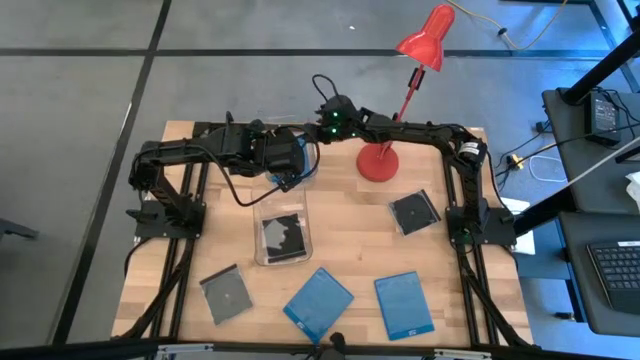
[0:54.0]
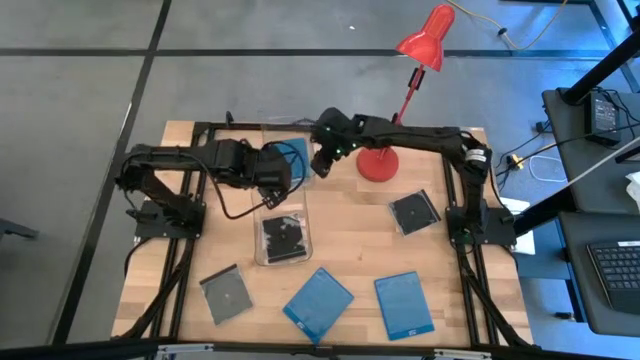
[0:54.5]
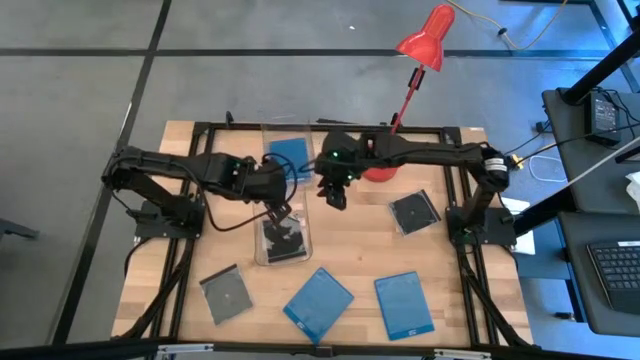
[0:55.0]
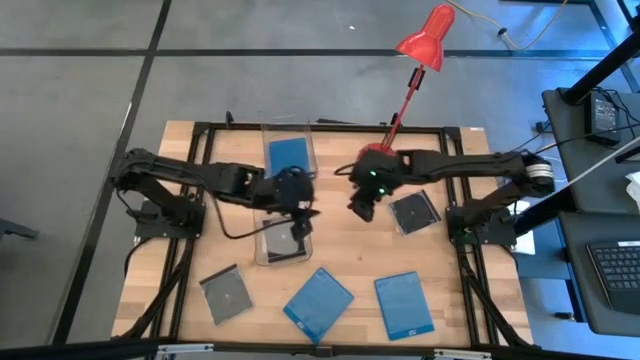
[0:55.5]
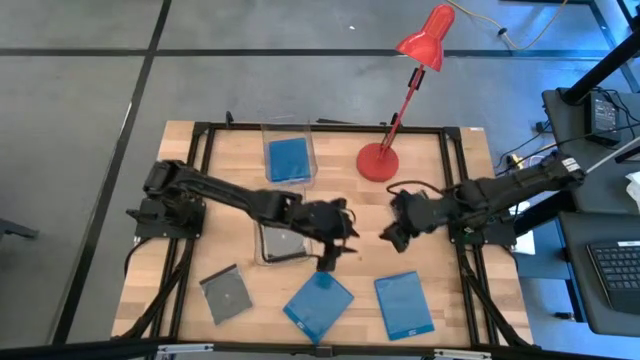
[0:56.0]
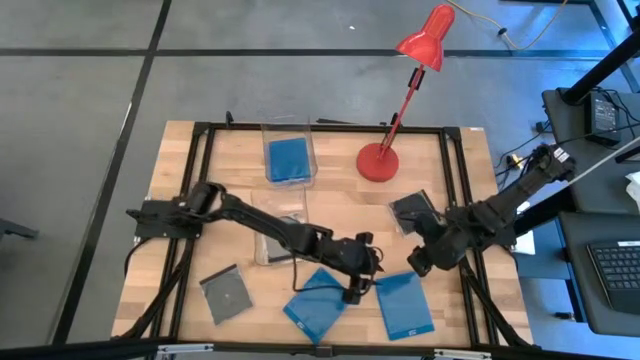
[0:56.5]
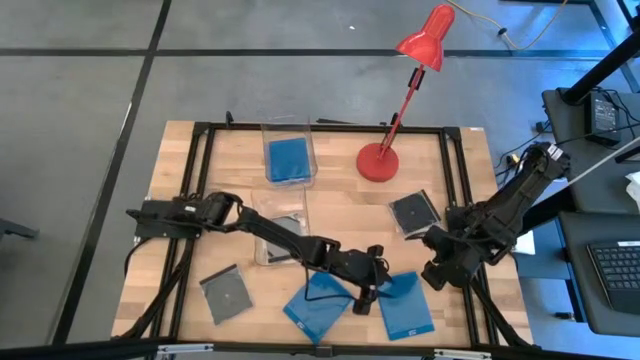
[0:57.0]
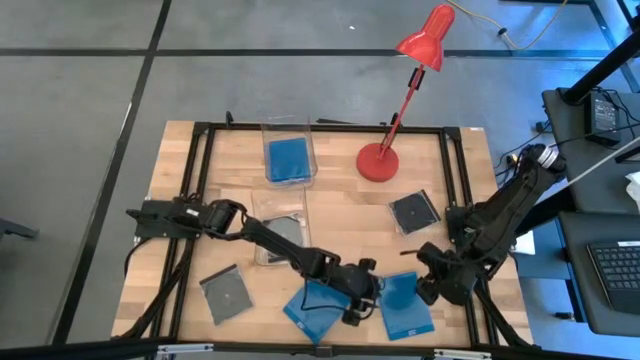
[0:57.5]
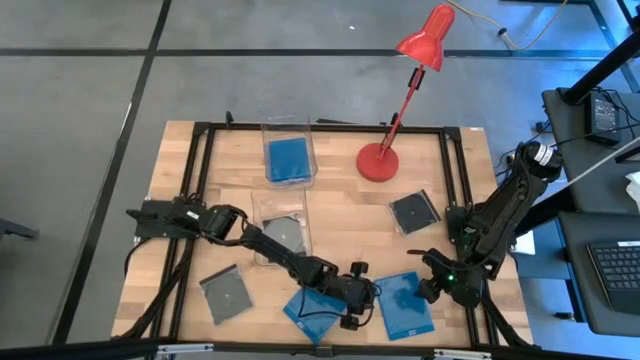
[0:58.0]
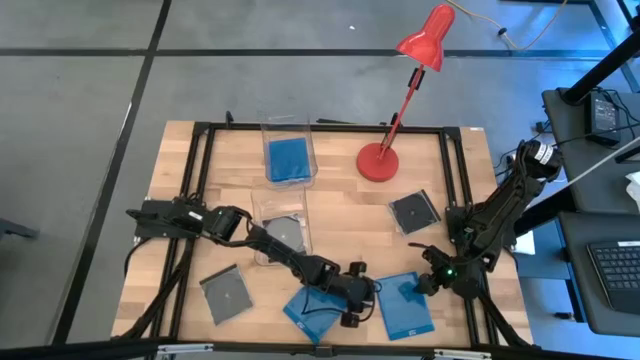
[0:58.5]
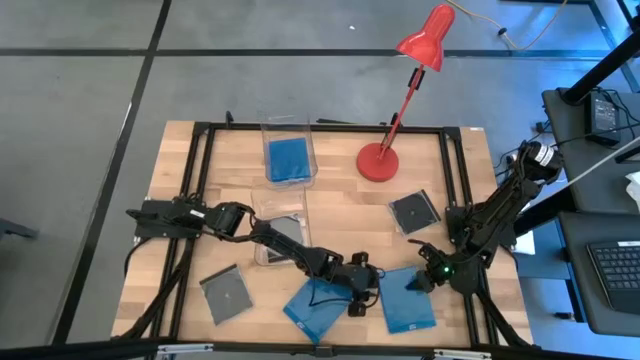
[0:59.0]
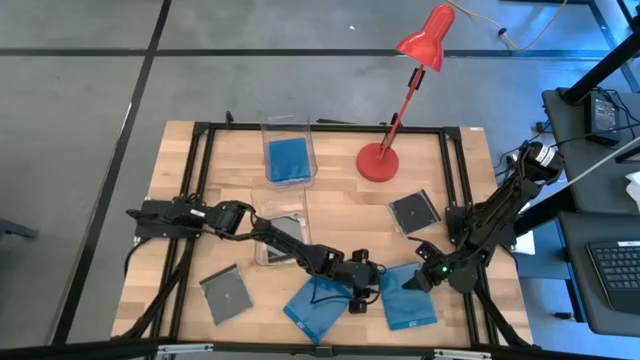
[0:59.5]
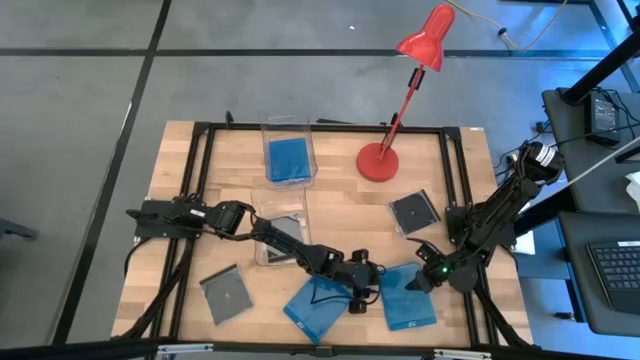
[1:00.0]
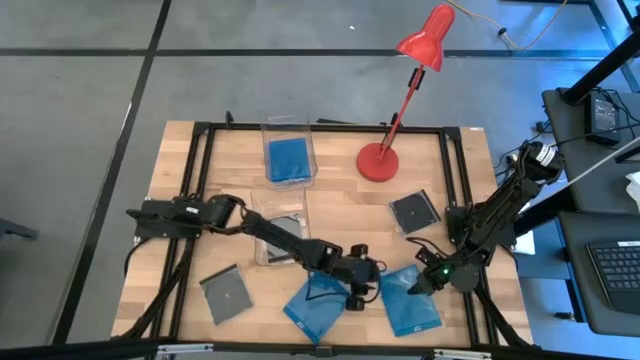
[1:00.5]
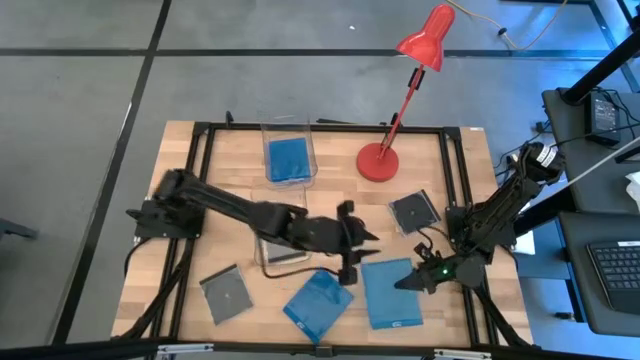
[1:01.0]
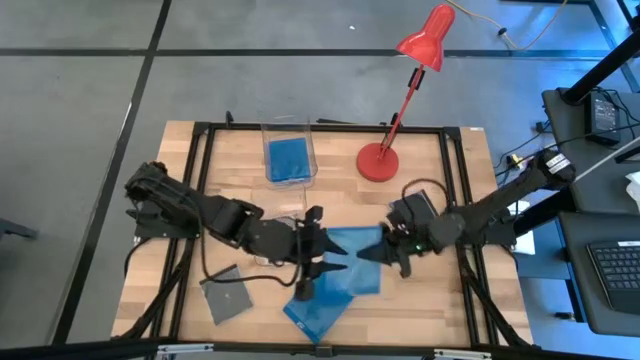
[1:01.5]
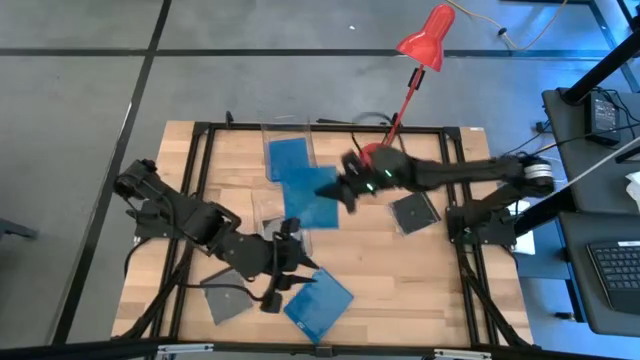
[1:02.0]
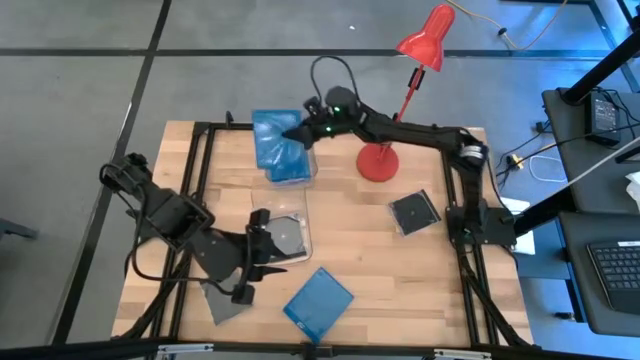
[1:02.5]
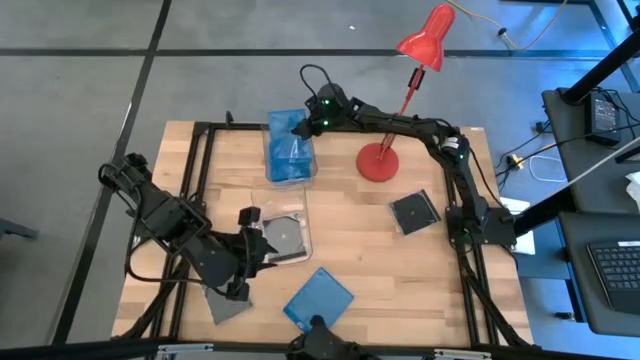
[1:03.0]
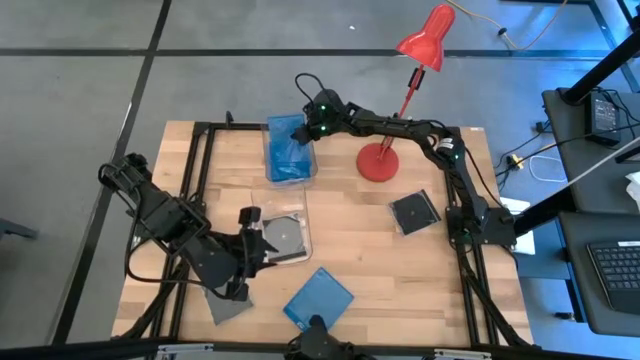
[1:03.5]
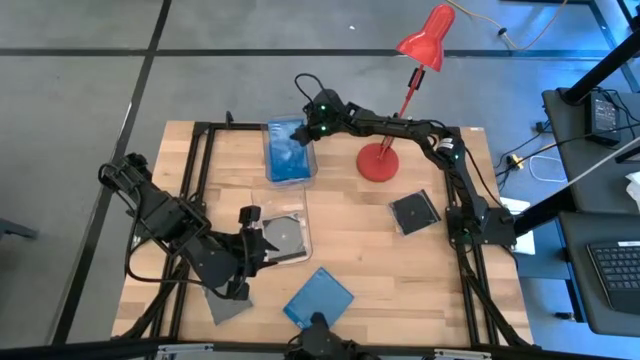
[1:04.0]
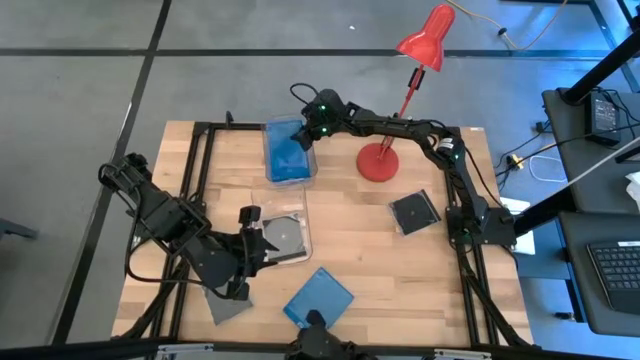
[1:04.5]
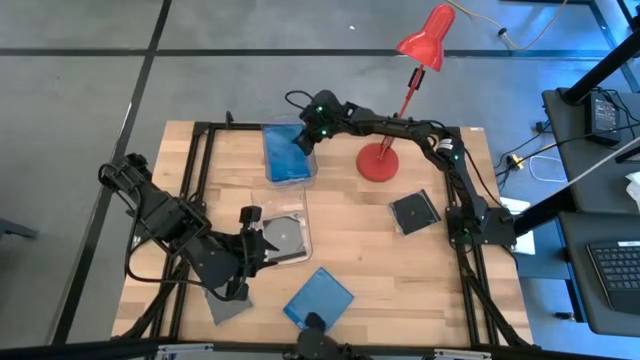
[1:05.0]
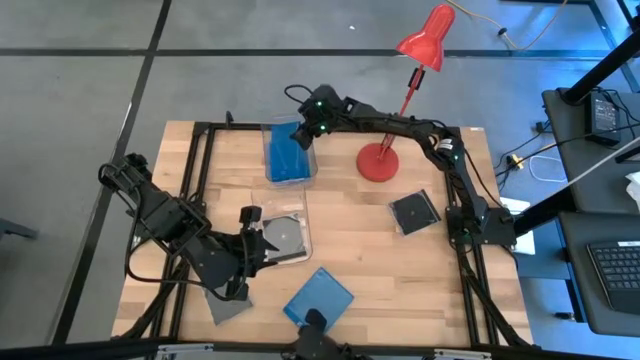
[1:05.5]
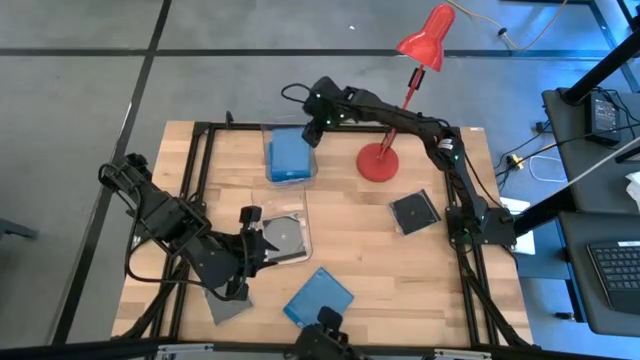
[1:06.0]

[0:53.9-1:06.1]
Task: Pick & place jewel cases by type
Put the right blue cd case into the top transparent bin

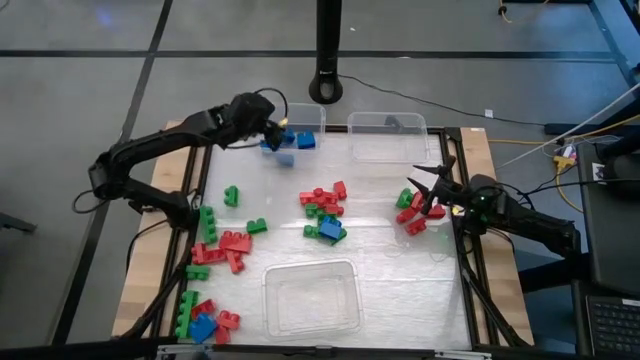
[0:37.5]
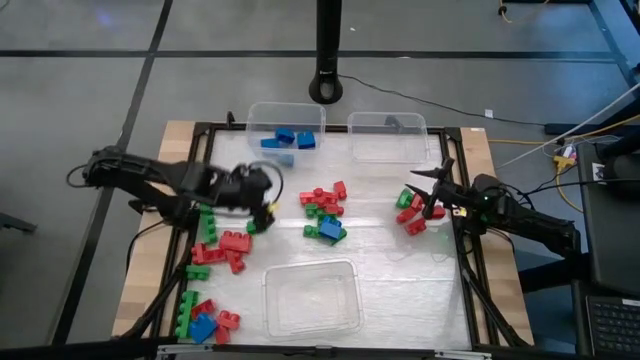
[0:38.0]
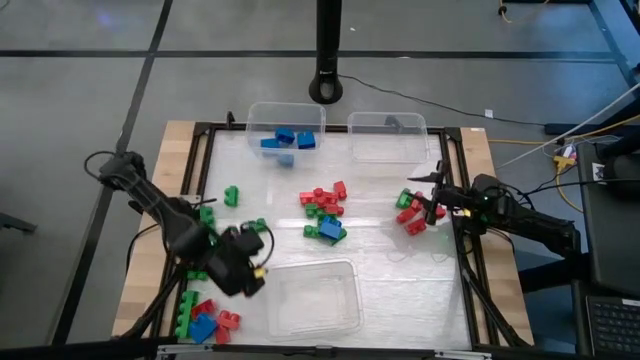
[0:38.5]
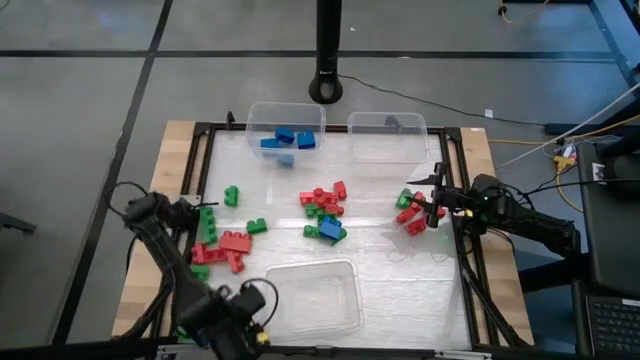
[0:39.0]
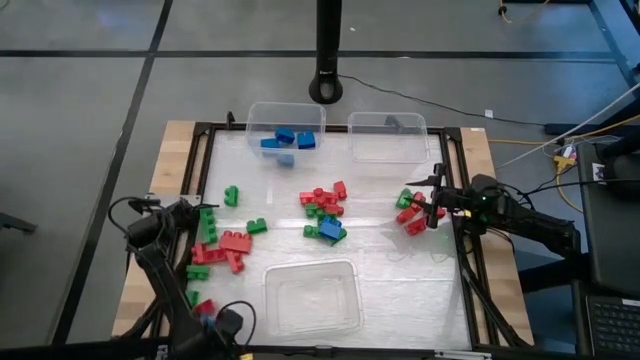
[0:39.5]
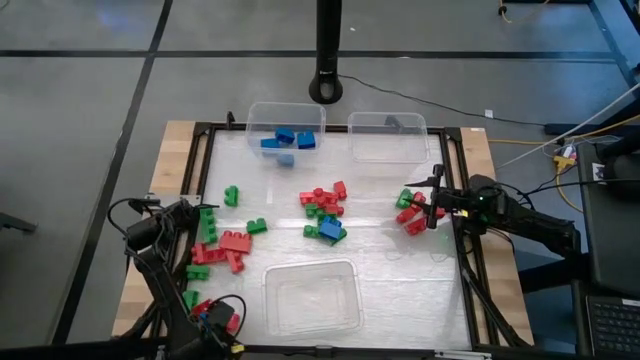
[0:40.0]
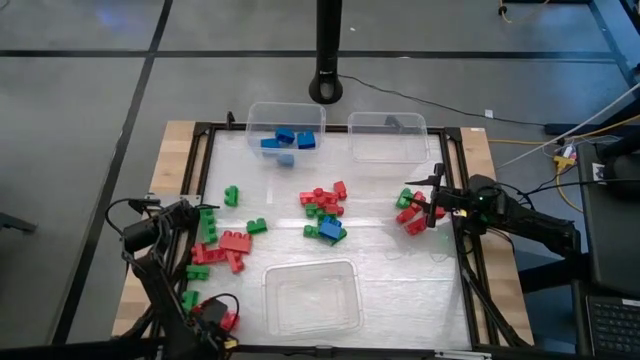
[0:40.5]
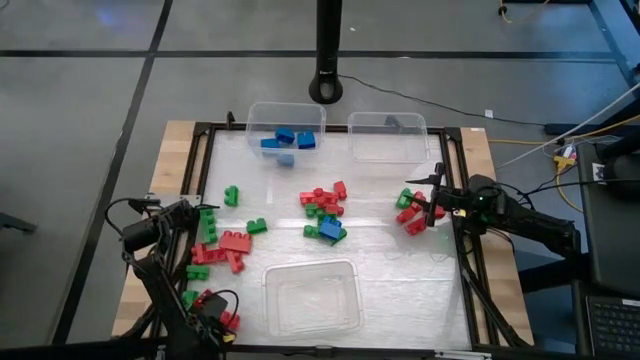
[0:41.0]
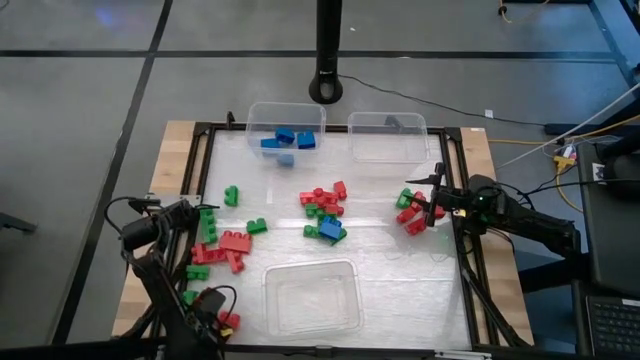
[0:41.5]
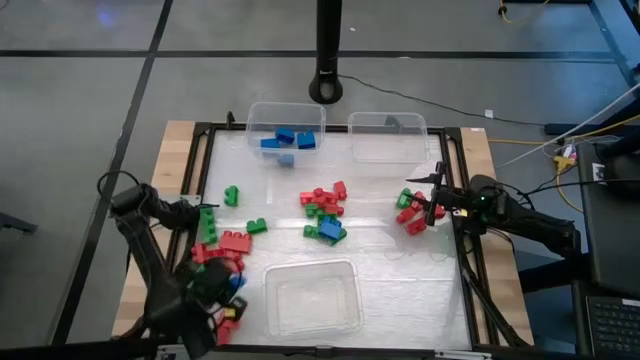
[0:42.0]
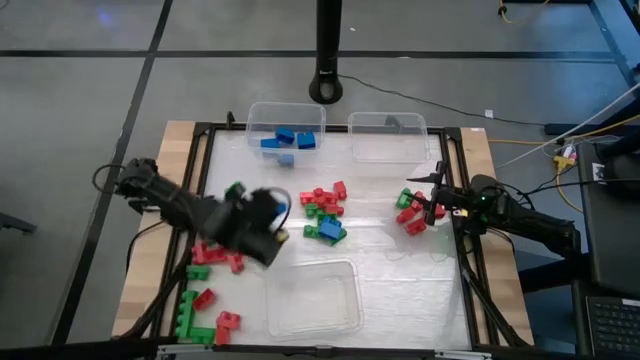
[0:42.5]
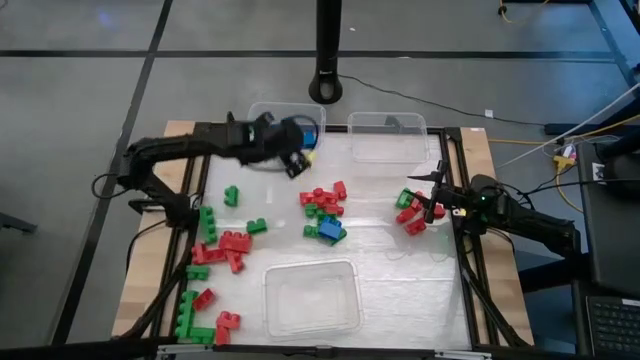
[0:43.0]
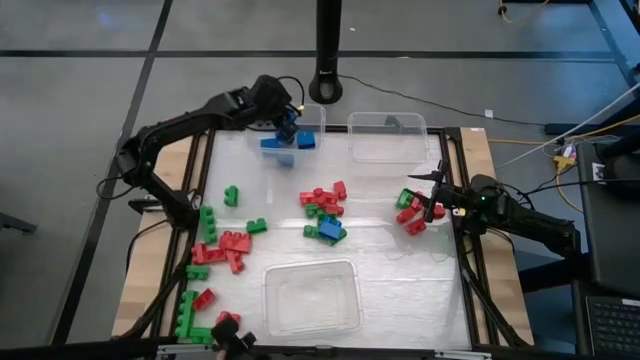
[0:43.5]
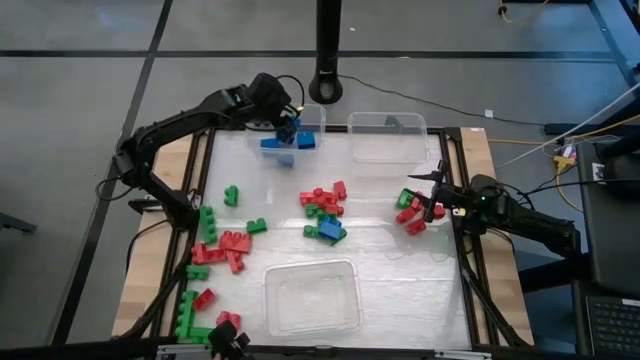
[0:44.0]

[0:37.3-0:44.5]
Task: Sort blocks
Put the blue game piece into the top left transparent bin

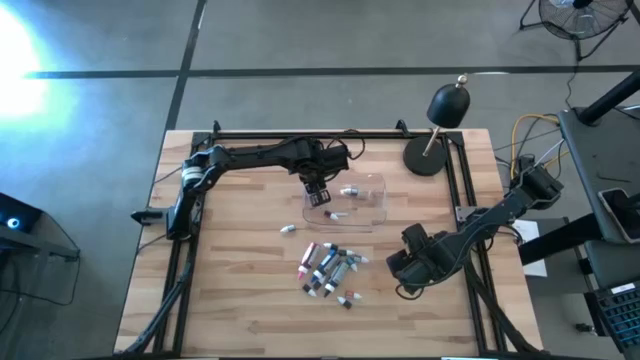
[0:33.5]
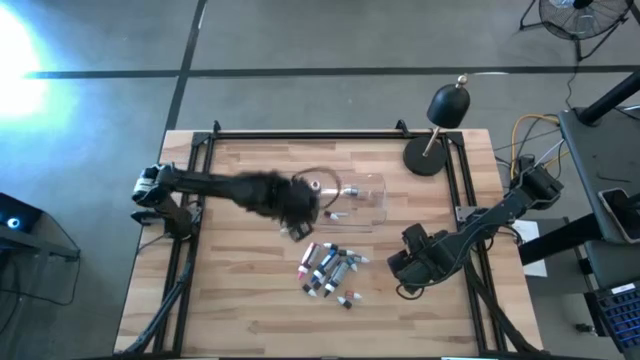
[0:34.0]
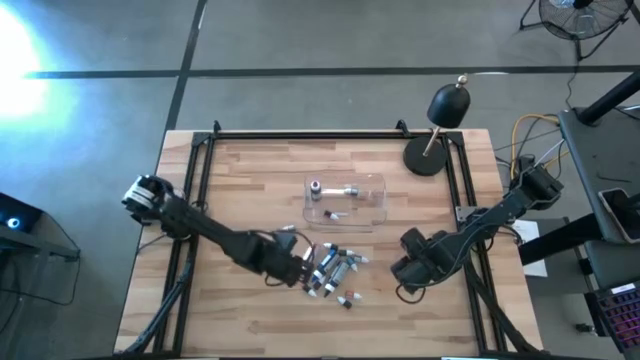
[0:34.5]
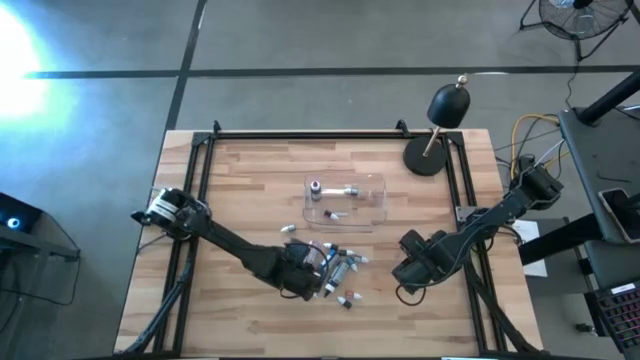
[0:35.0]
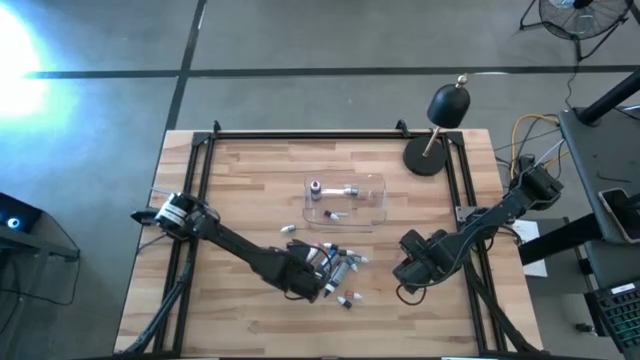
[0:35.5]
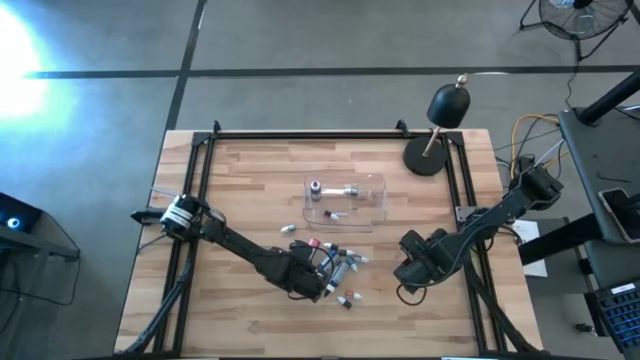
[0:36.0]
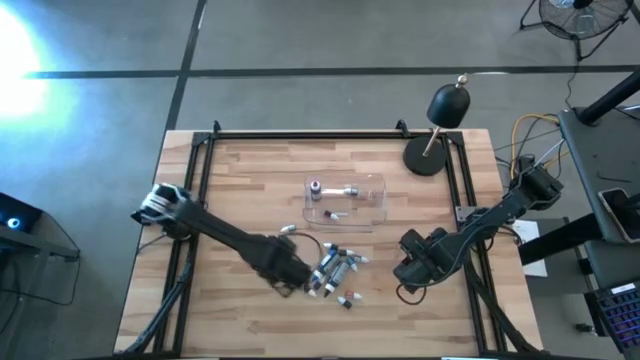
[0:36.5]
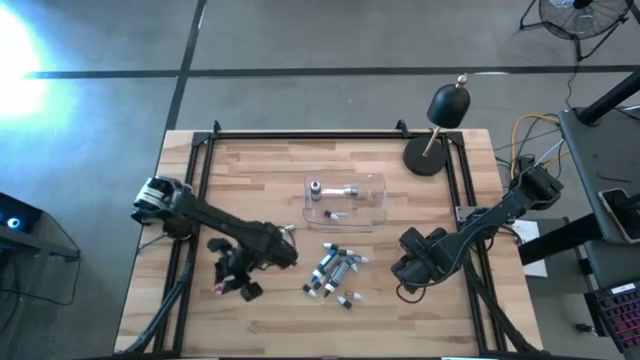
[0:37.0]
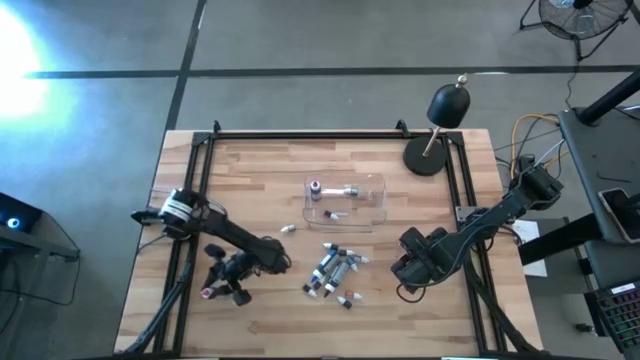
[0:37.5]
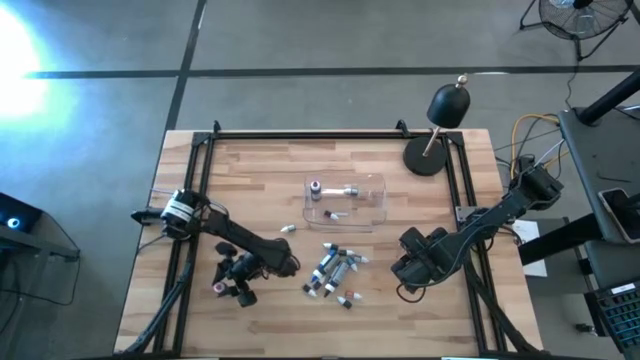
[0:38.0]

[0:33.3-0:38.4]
Task: Pick & Place food coloring
Move the large pink food coloring bottle to the left side of the table
